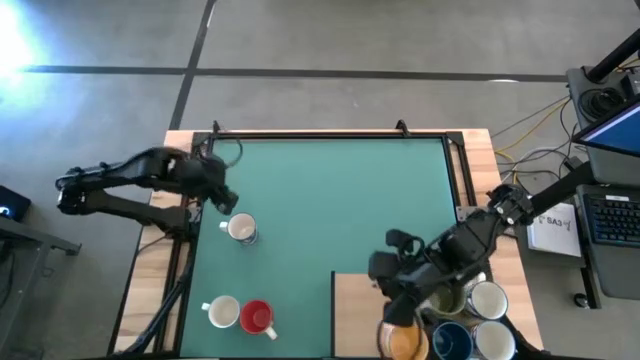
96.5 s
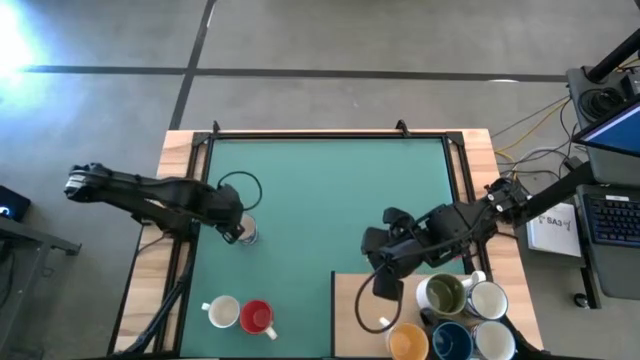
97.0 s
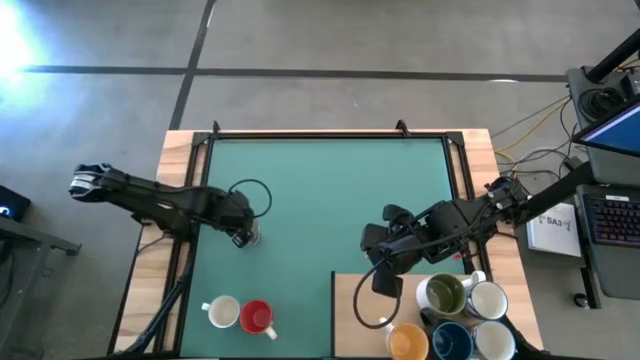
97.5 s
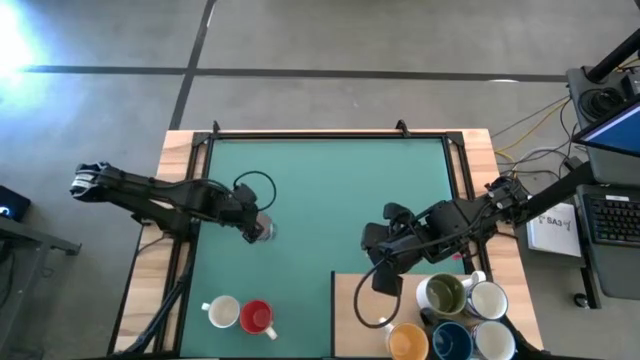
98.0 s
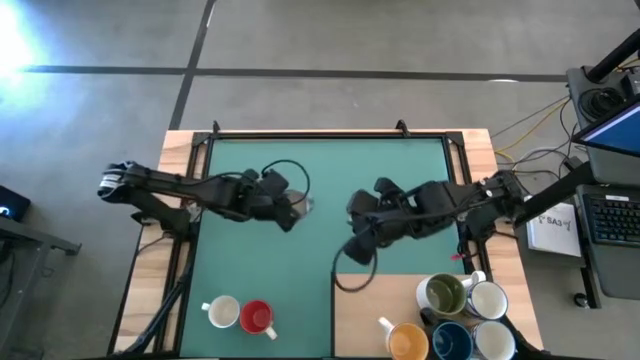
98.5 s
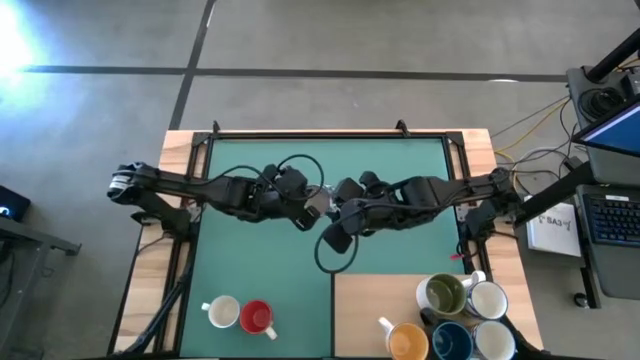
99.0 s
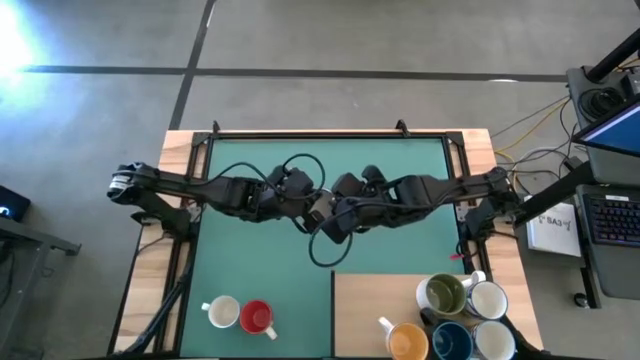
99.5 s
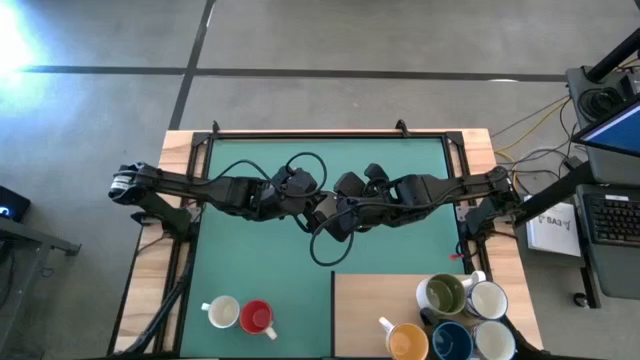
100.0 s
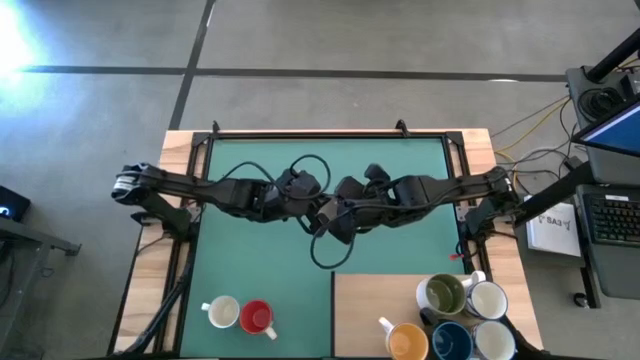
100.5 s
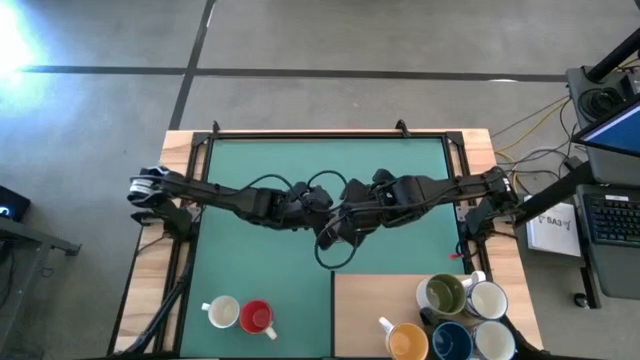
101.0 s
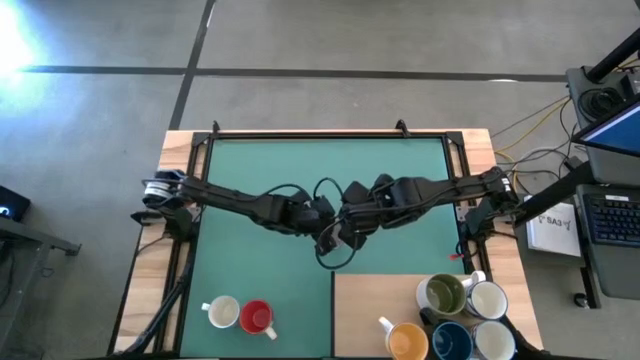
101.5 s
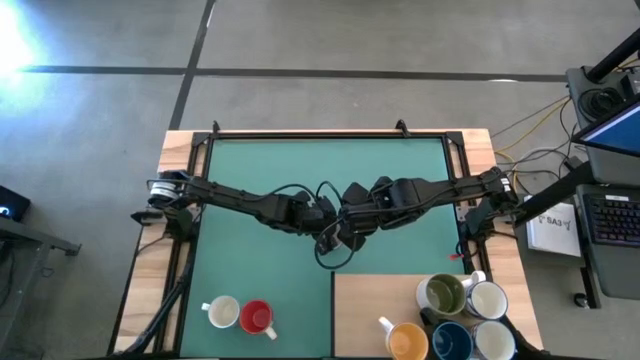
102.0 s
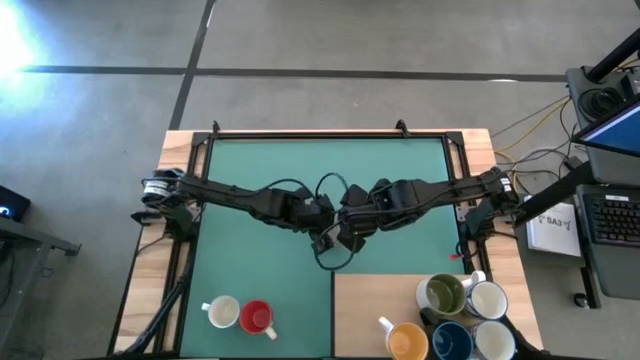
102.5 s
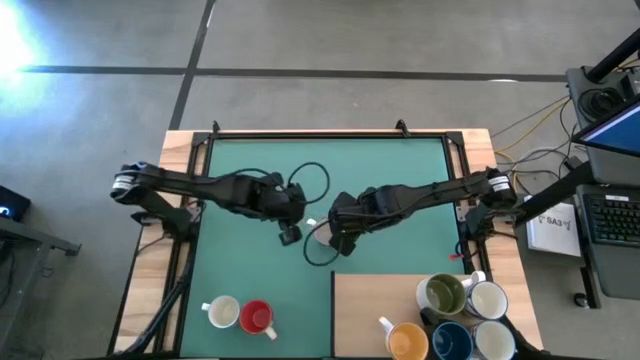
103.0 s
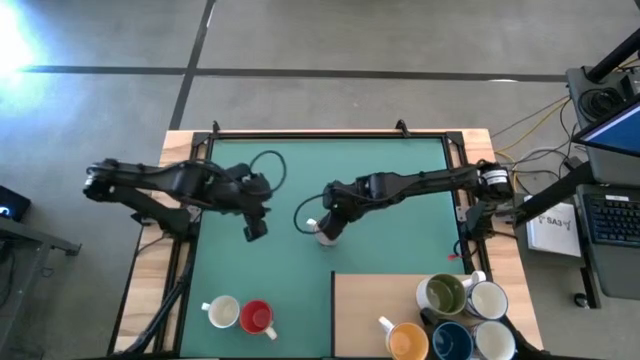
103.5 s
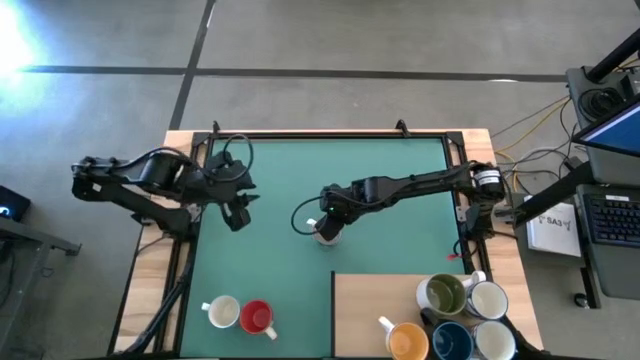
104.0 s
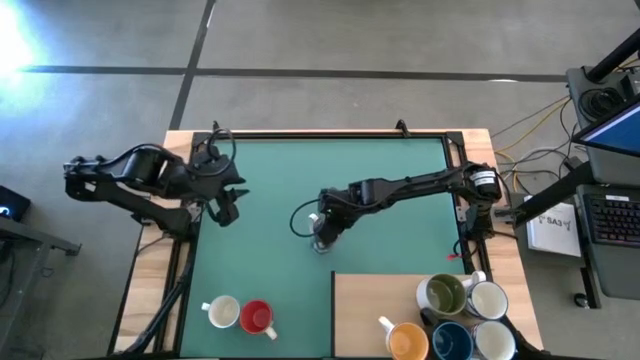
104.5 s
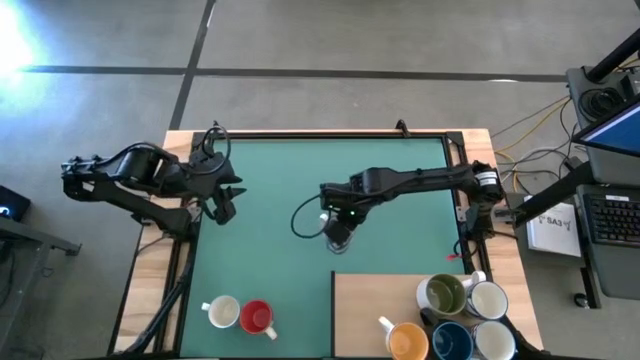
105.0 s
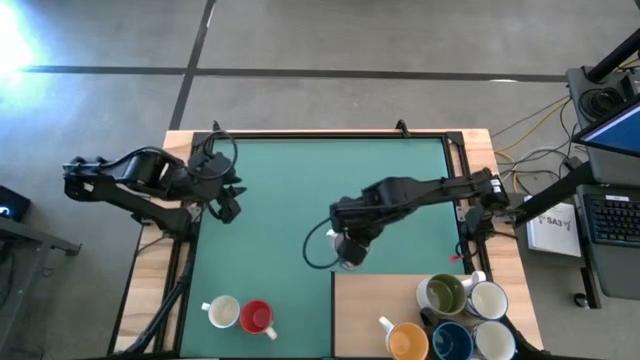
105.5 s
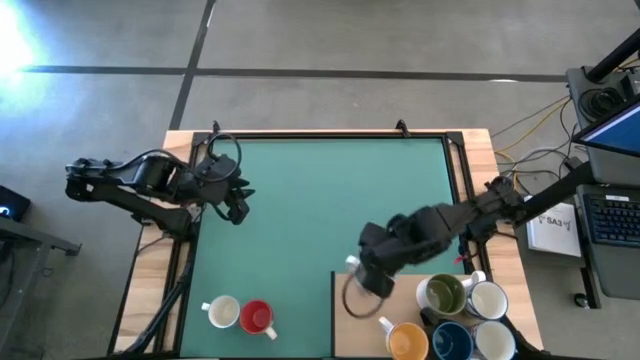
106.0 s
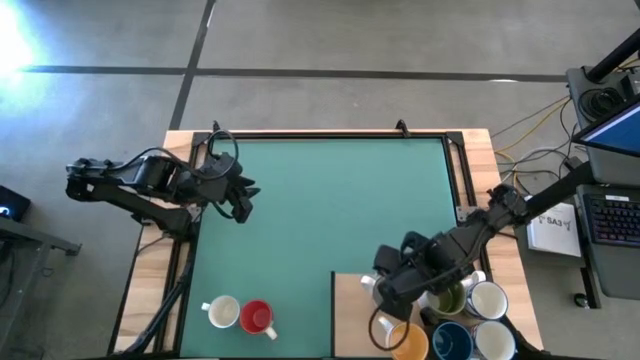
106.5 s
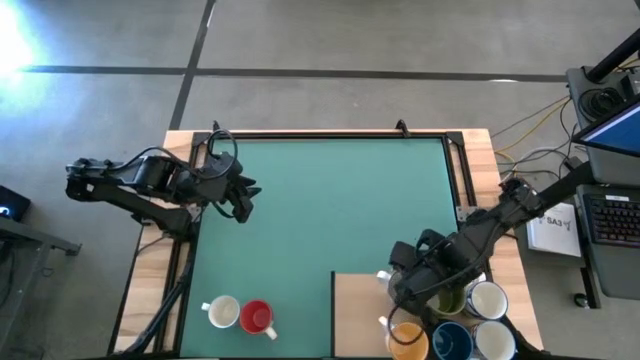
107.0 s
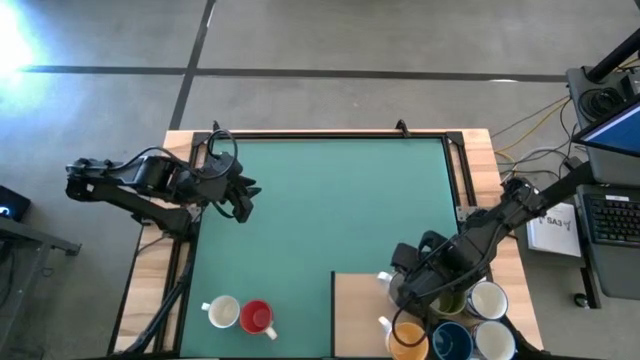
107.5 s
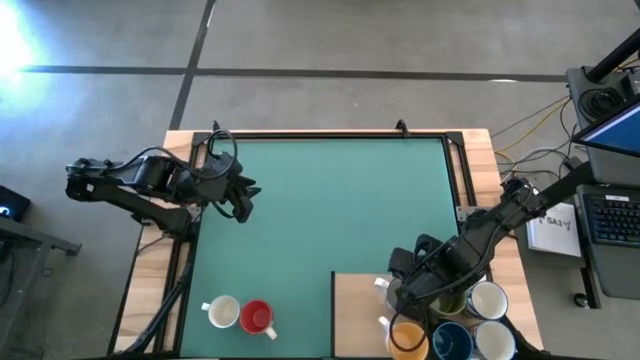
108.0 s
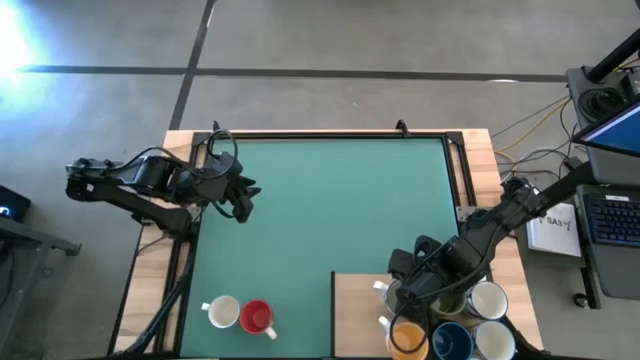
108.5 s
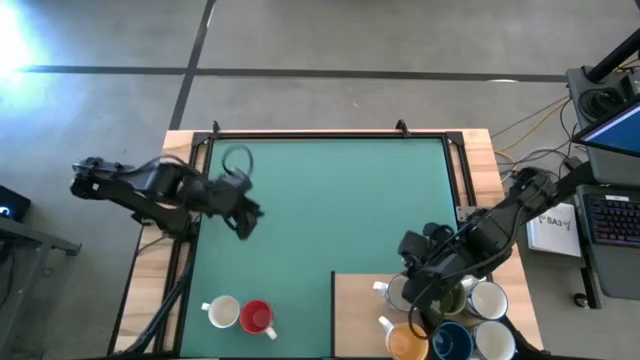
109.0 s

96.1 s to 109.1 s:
Task: Place coffee mugs
Put the blue patterned mug on the shelf

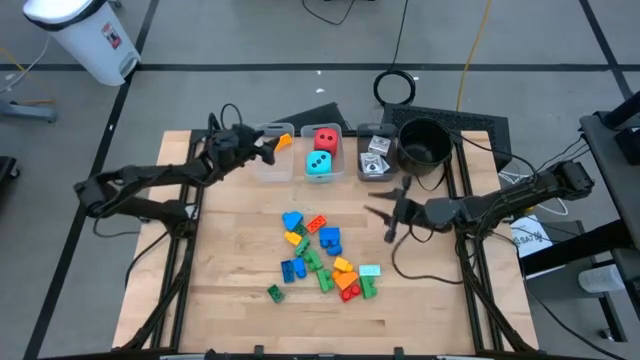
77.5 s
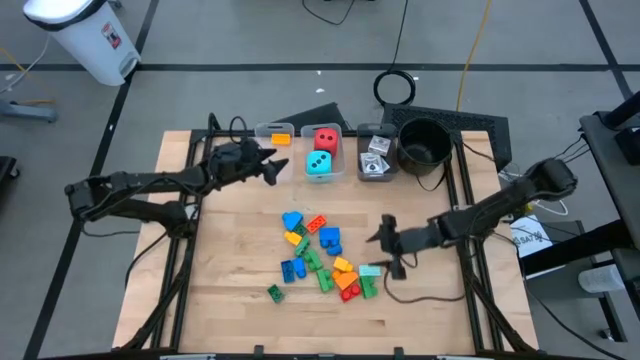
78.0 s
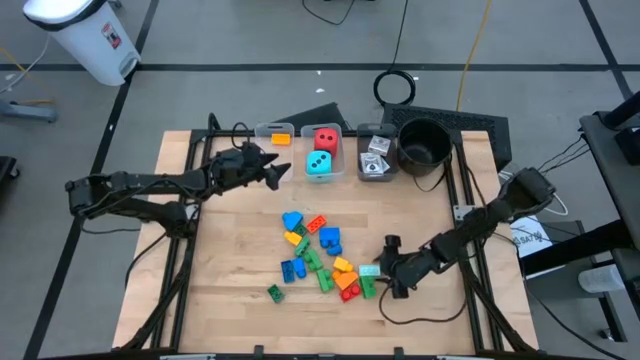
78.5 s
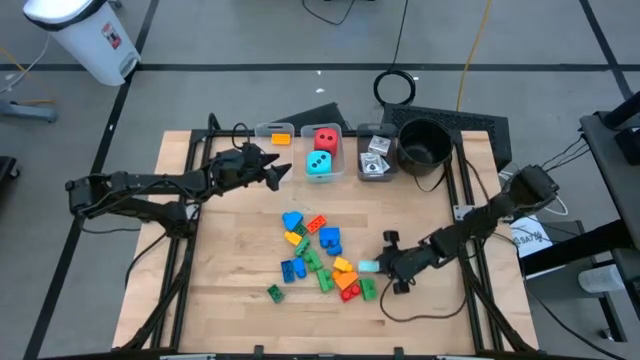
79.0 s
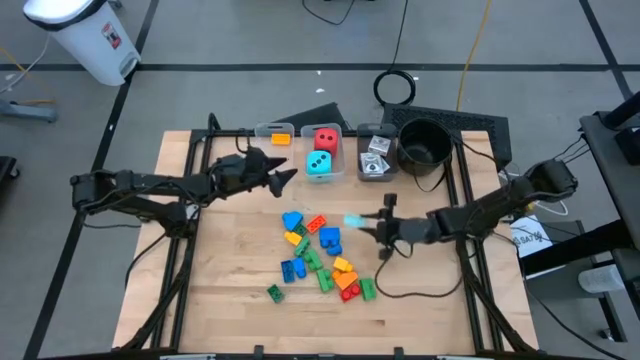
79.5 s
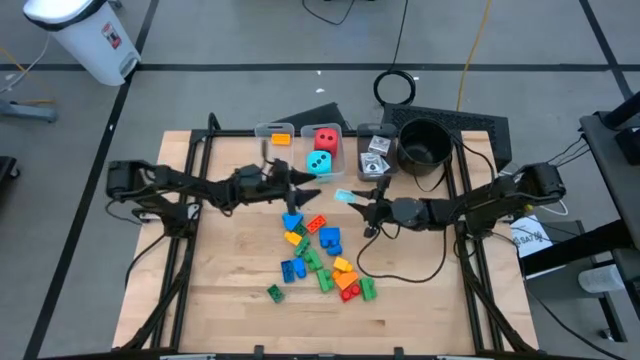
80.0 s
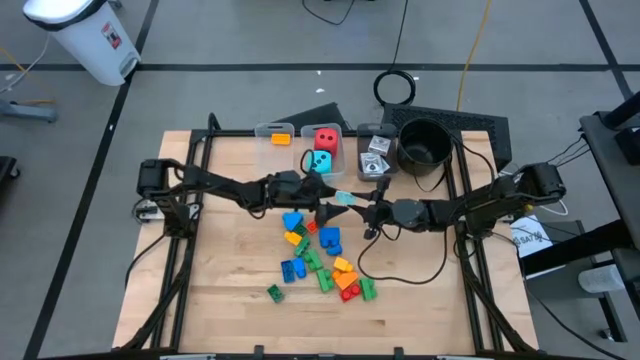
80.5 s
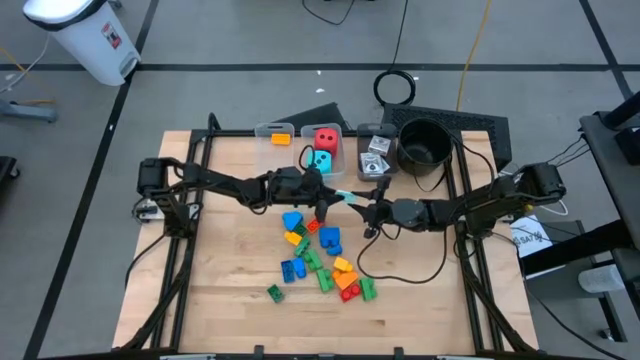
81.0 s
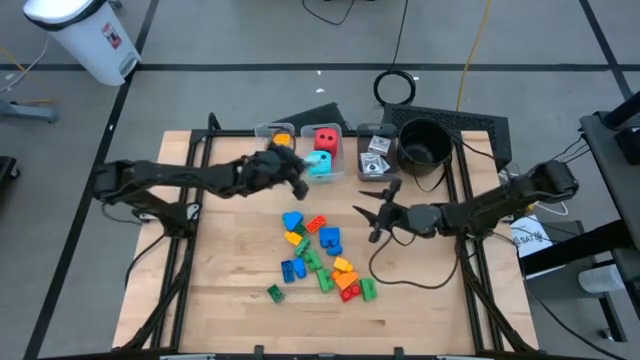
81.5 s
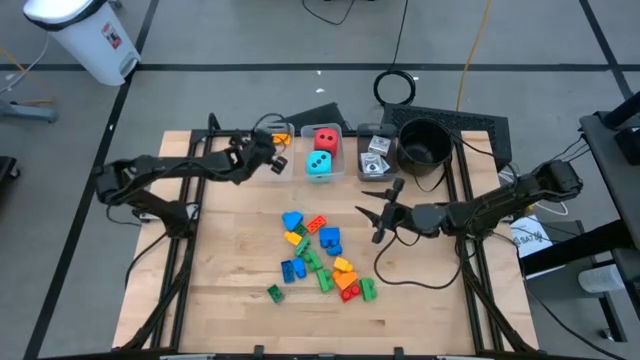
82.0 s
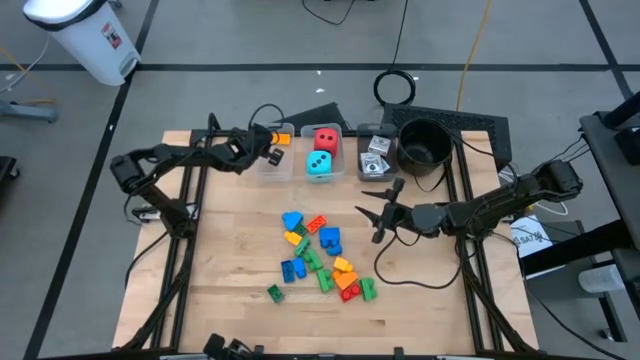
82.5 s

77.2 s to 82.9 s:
Task: Pick & Place Toys
Put the light blue game piece into the left transparent bin
